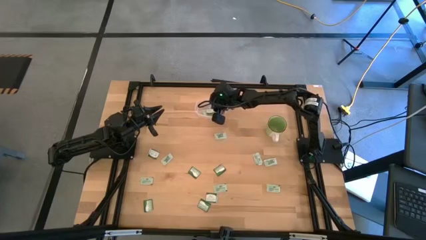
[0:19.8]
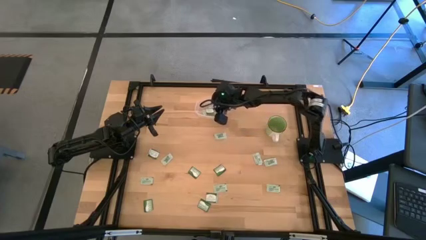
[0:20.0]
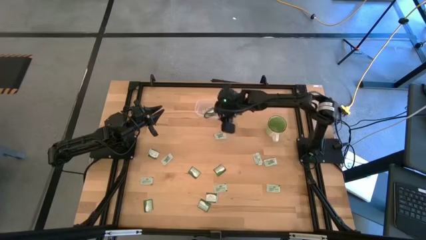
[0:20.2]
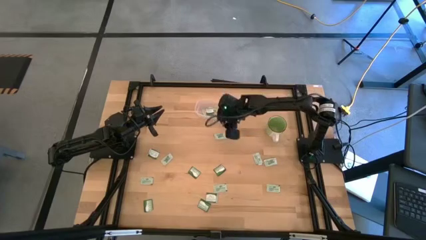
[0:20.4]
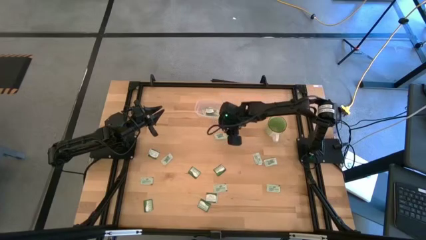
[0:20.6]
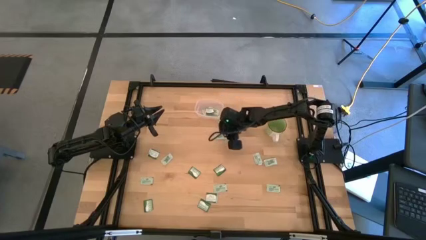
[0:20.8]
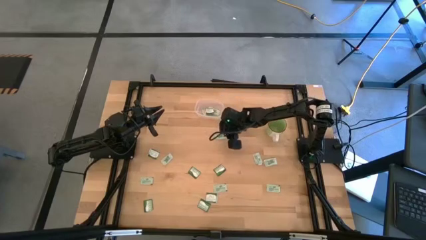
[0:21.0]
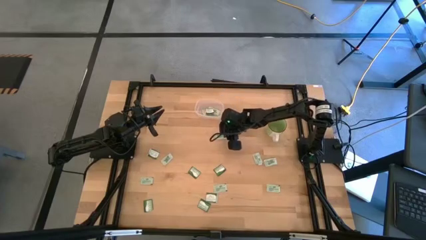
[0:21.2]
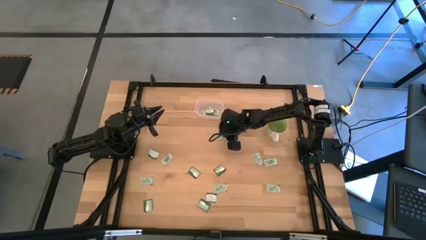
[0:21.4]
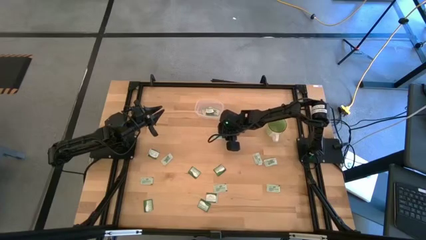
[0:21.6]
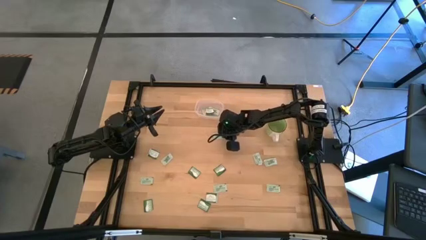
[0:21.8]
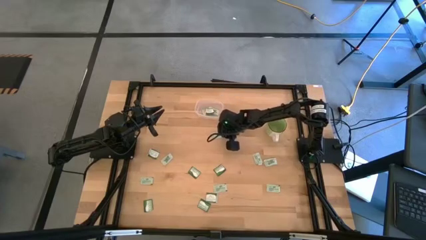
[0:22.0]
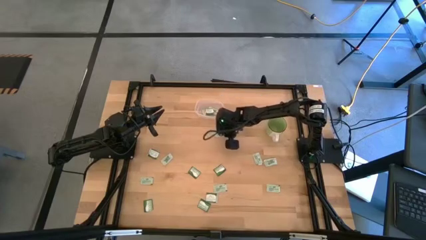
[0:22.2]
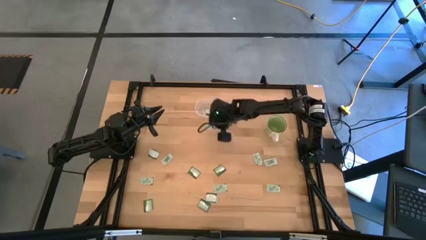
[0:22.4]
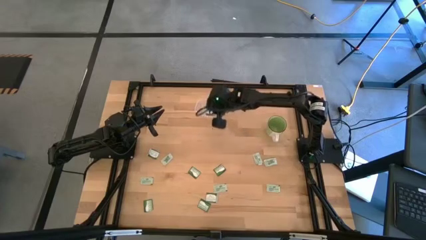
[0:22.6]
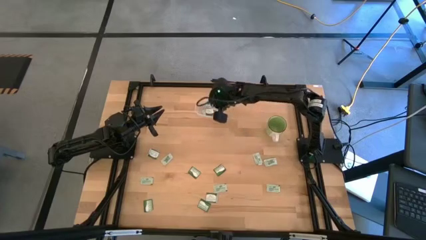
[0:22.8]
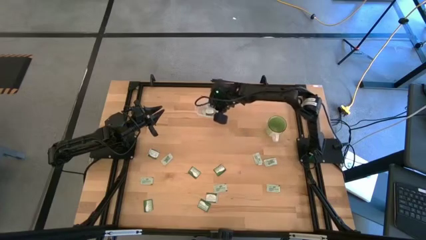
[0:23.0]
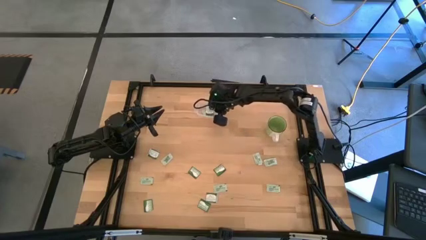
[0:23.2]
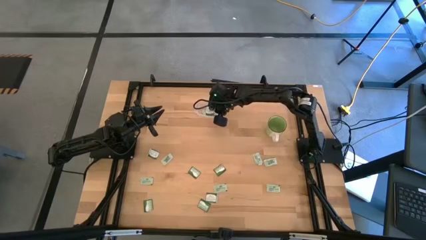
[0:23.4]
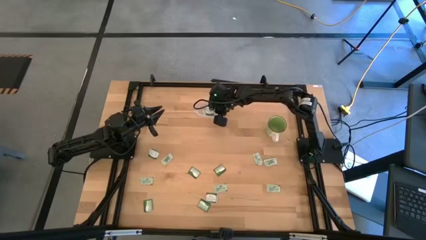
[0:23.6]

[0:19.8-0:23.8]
Task: Pick and place items into bin
Put the green stevia packet into the bin

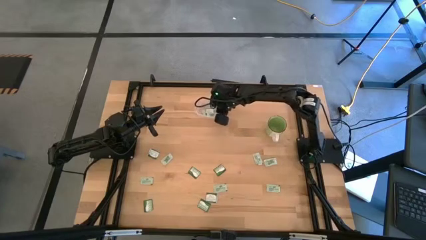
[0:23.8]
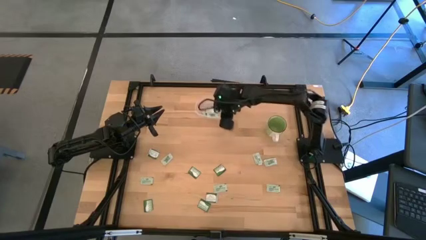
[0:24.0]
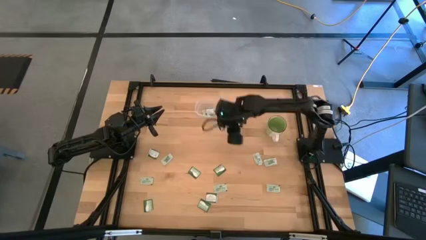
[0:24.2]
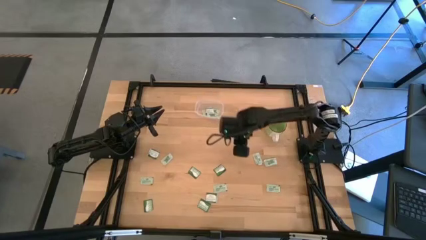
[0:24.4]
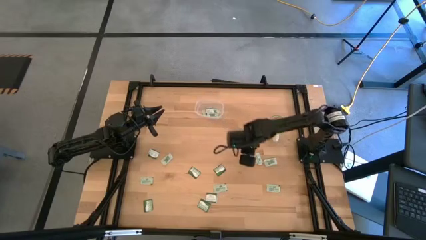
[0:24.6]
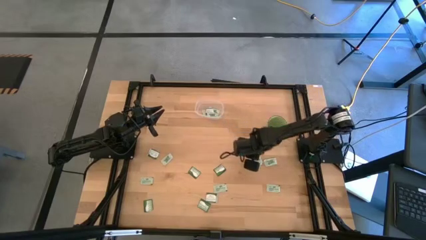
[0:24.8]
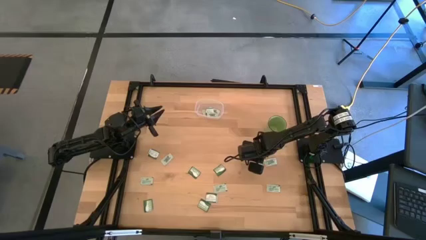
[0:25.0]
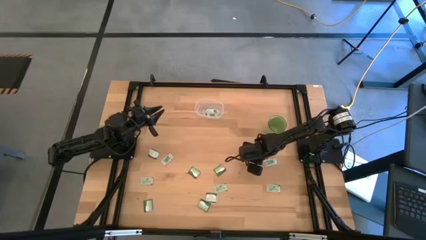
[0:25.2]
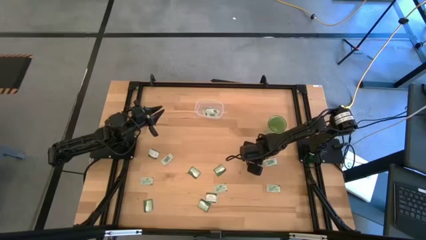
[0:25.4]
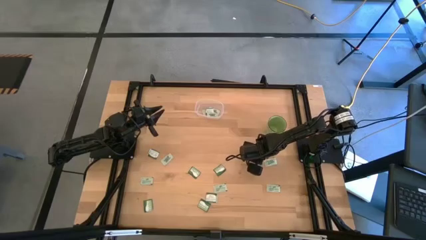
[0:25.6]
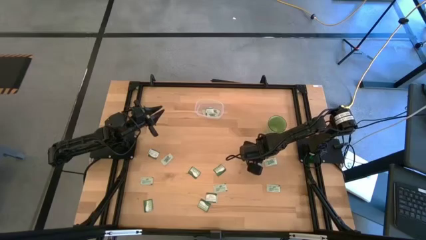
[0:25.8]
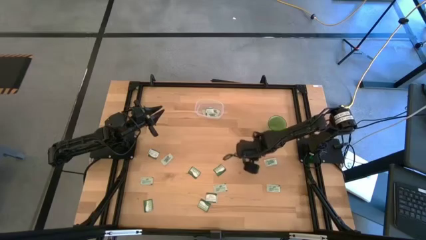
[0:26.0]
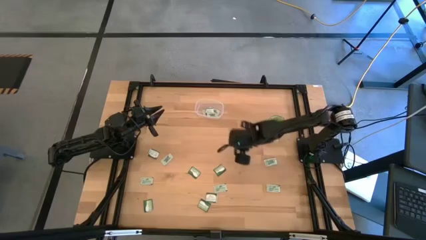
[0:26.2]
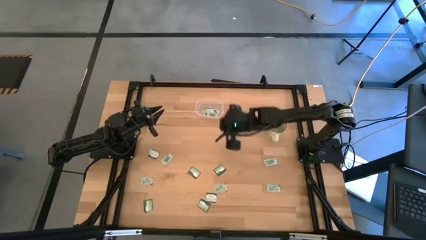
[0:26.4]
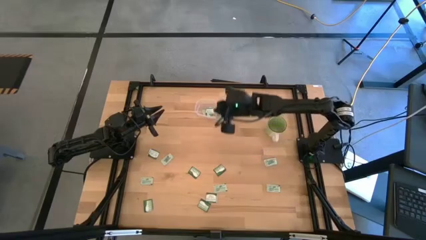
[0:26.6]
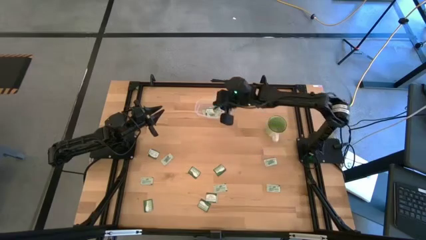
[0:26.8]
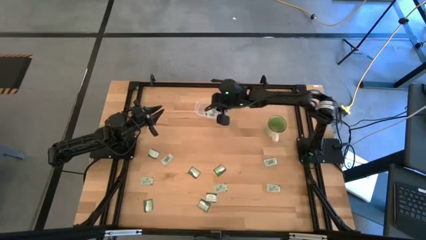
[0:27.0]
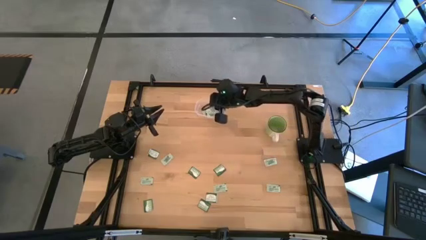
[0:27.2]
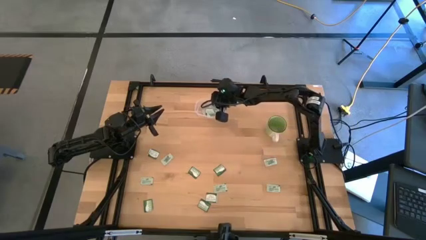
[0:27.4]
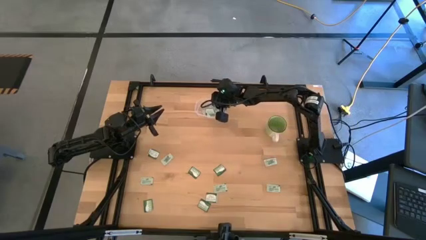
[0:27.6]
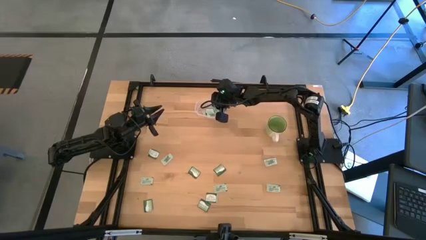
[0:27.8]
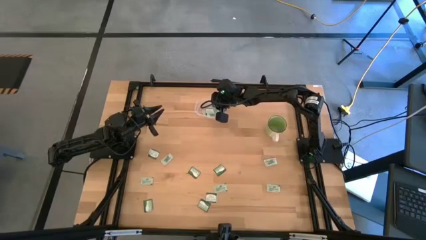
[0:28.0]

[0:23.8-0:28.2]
Put the green stevia packet into the bin

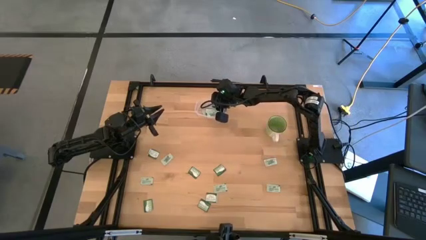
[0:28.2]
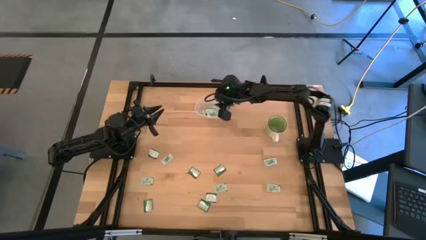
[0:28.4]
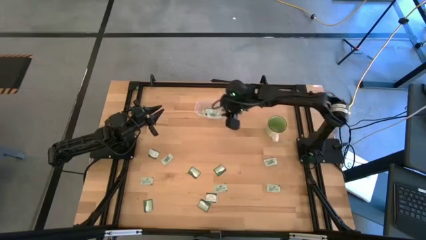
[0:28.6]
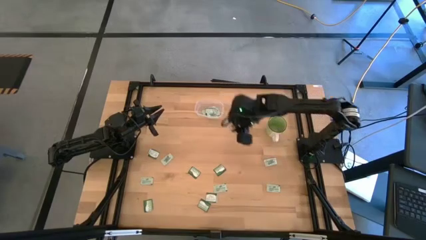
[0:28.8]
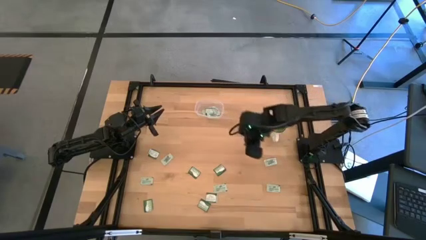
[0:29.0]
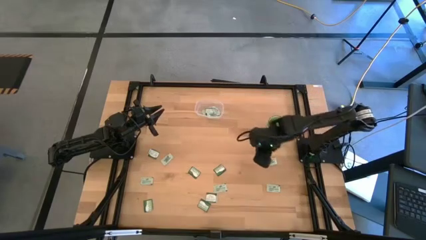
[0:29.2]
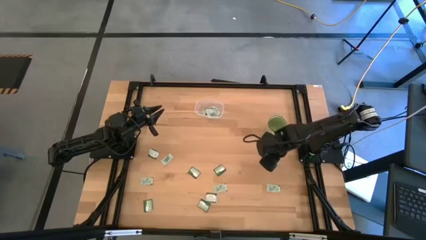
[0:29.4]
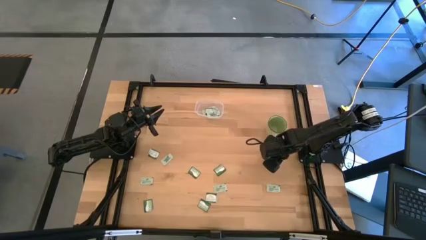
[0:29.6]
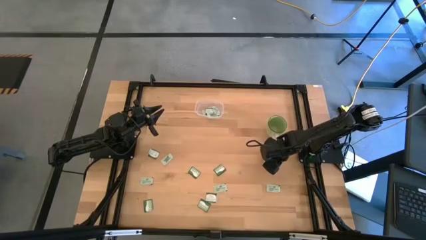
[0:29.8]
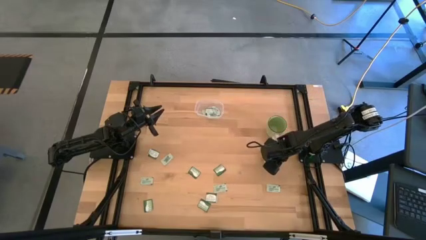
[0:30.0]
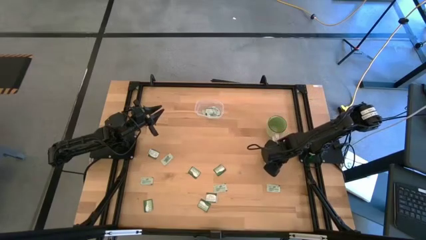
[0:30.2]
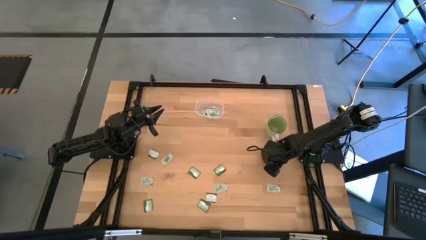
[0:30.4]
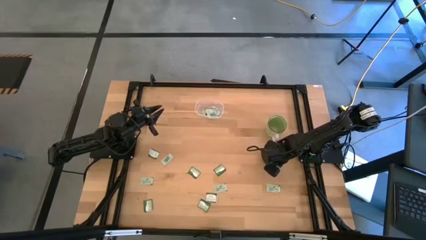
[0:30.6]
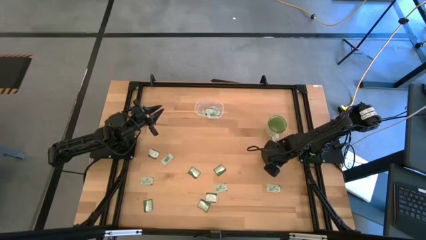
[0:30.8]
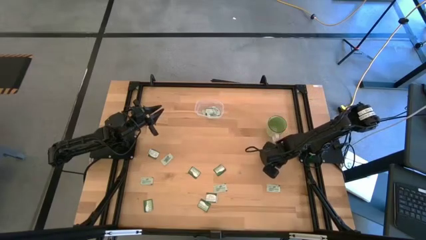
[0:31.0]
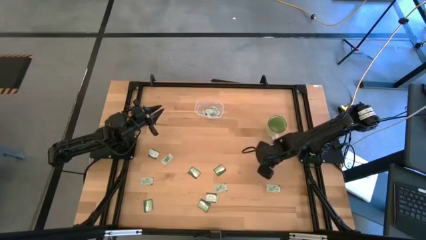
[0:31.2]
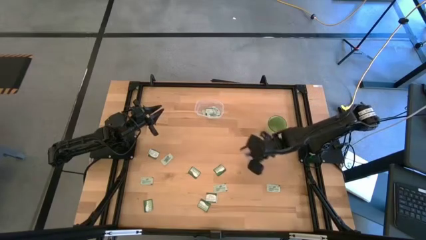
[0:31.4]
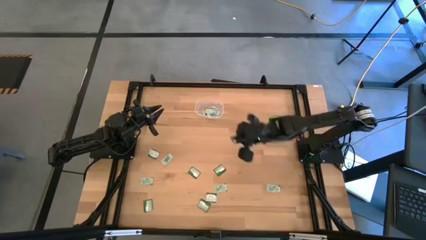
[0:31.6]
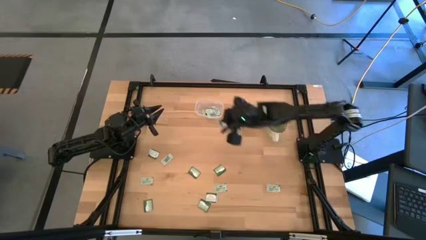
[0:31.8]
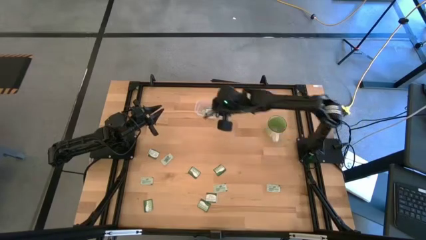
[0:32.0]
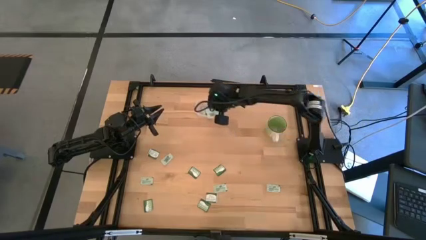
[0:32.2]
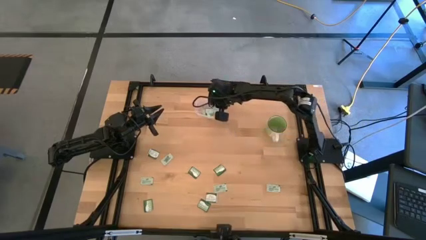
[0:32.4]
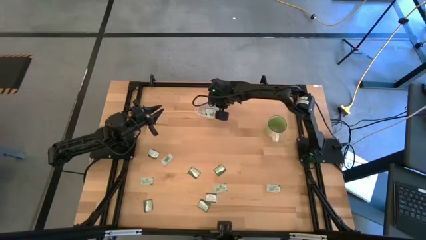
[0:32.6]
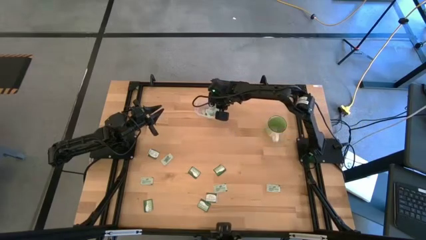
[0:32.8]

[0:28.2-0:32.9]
Put the green stevia packet into the bin

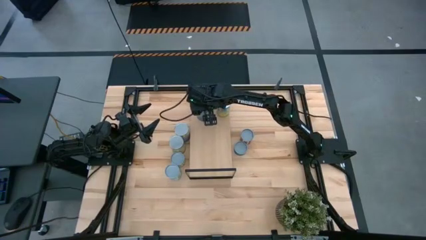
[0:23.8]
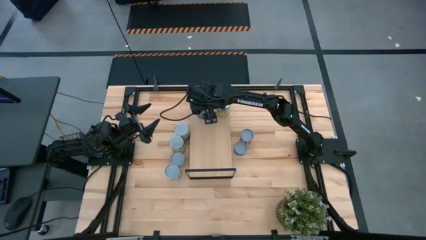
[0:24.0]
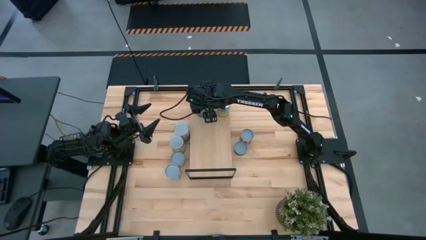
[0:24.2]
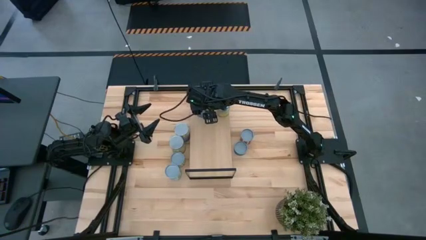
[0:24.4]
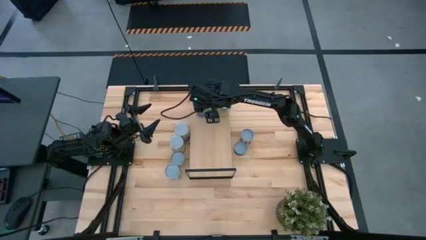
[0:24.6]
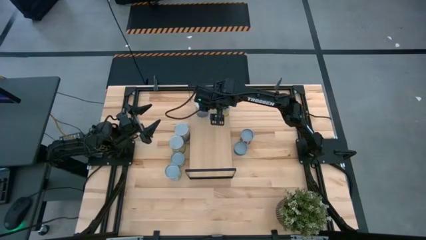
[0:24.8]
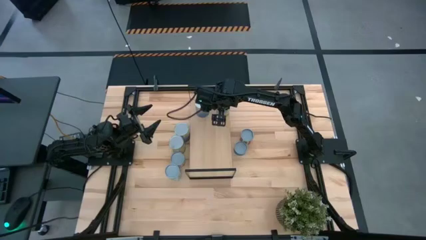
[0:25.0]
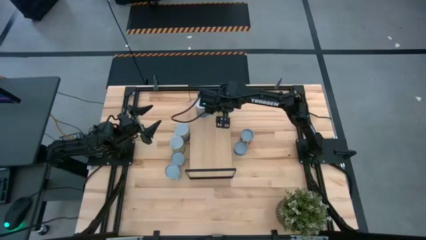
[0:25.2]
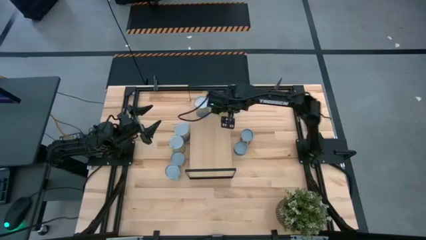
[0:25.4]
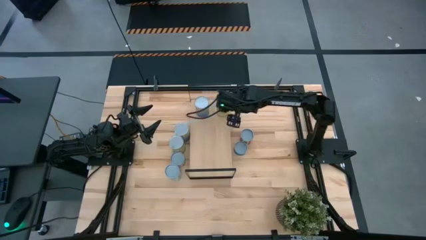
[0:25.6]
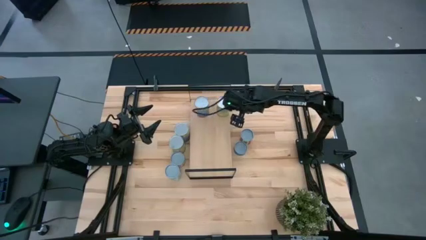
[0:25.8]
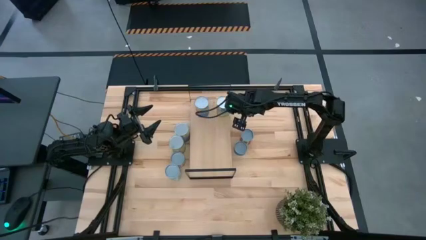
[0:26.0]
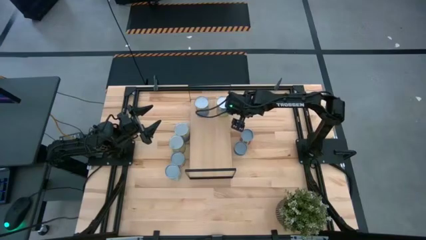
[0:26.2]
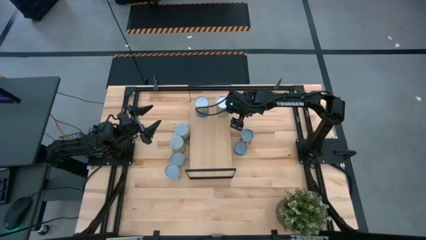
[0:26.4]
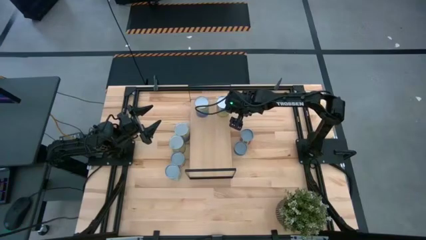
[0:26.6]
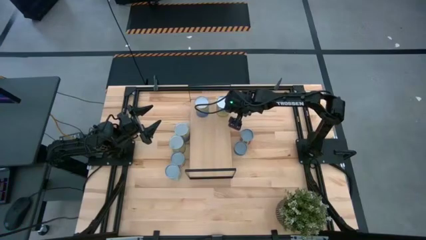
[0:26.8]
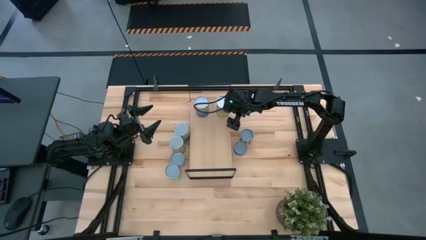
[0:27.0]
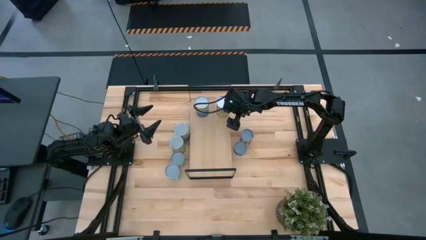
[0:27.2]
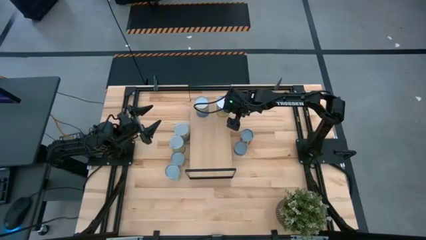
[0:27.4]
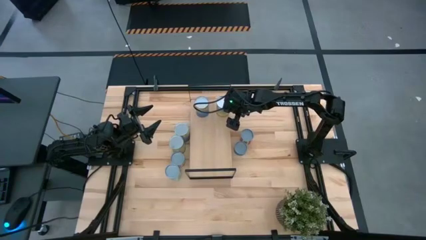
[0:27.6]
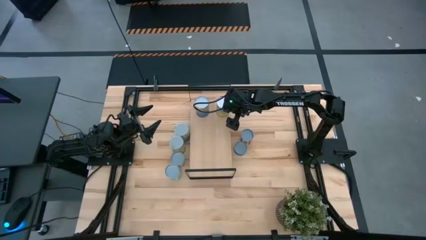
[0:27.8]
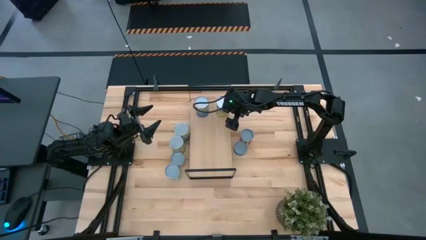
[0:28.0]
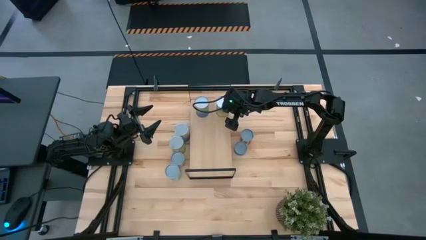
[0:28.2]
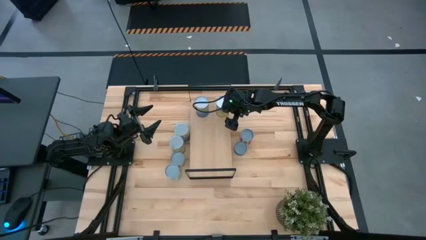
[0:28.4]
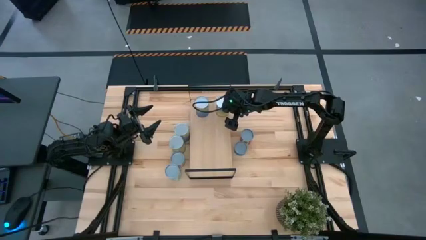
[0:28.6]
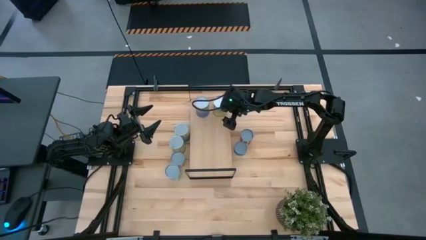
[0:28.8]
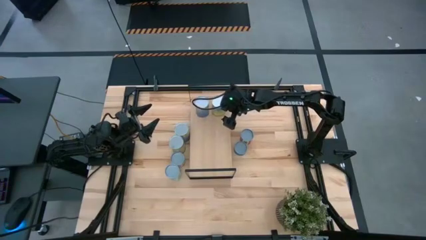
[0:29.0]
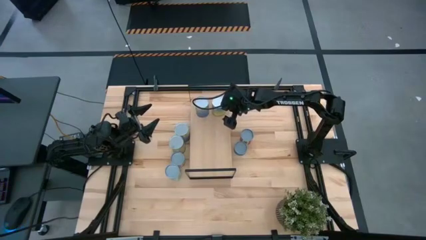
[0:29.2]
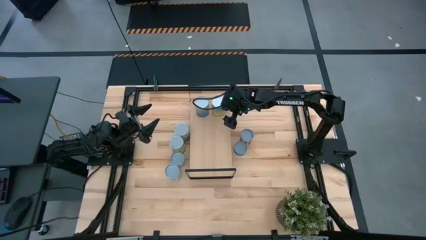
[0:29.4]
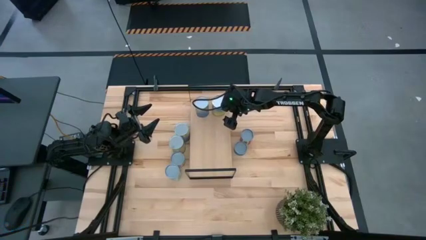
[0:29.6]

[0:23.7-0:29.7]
Task: Pick and place cans onto a shelf
Adjust the canned carrot on the shelf
